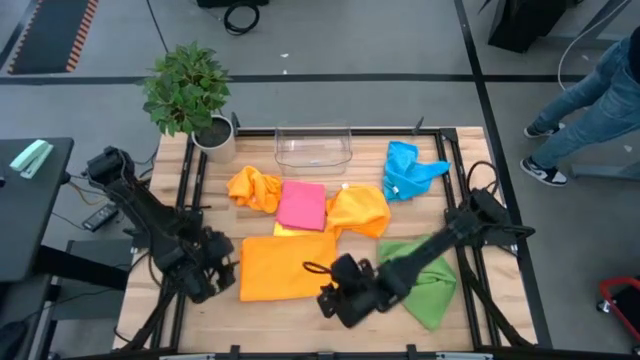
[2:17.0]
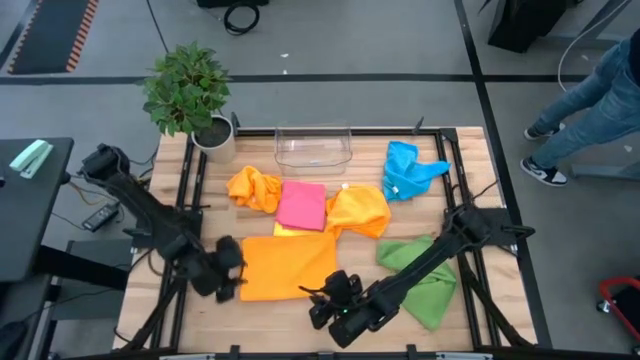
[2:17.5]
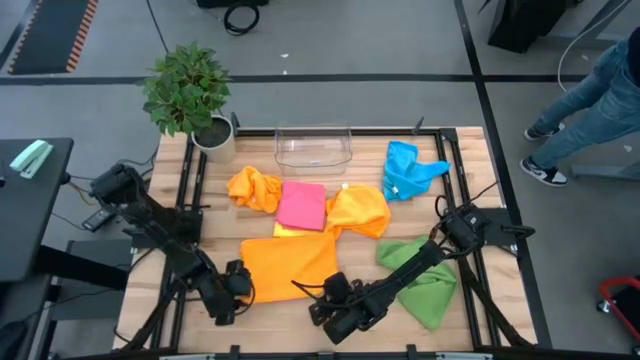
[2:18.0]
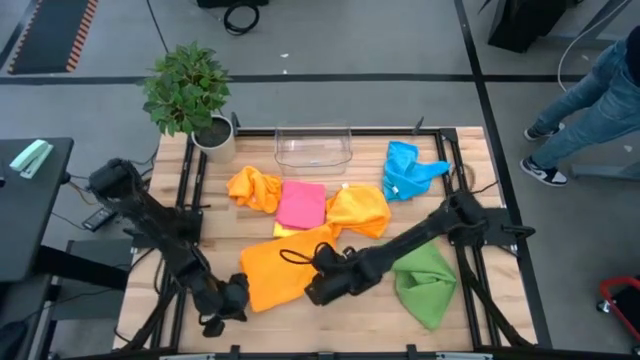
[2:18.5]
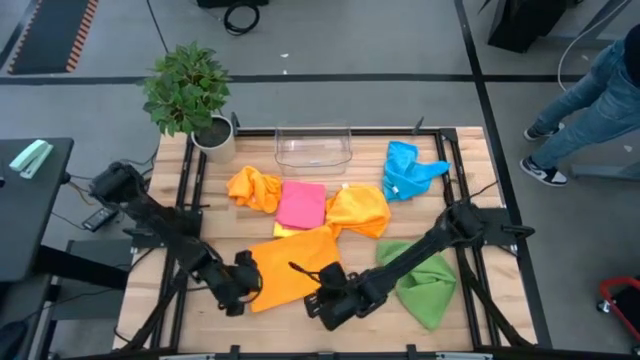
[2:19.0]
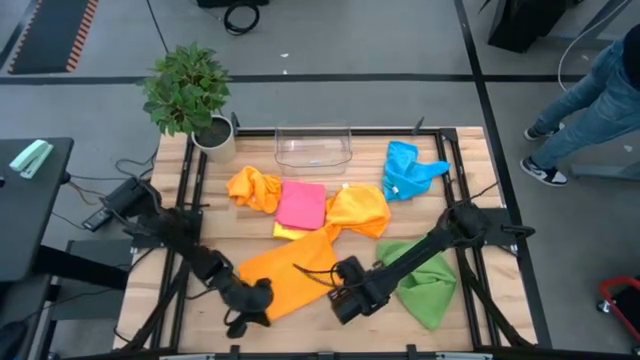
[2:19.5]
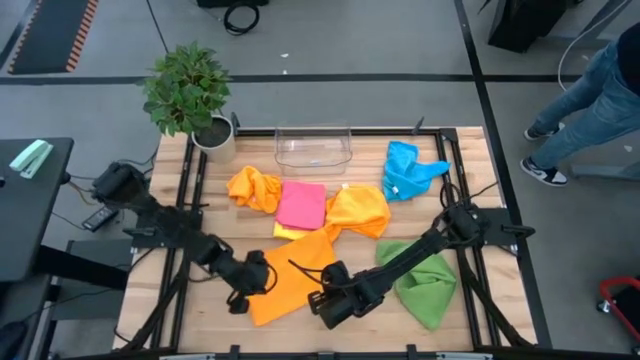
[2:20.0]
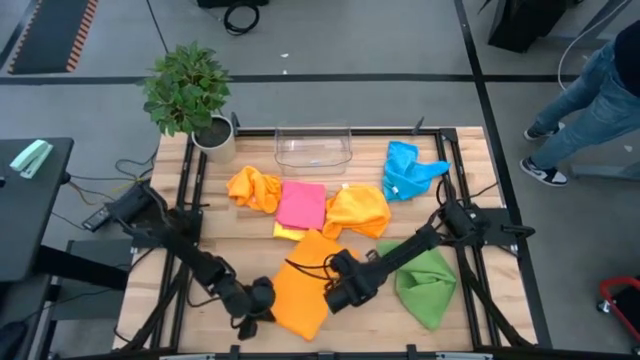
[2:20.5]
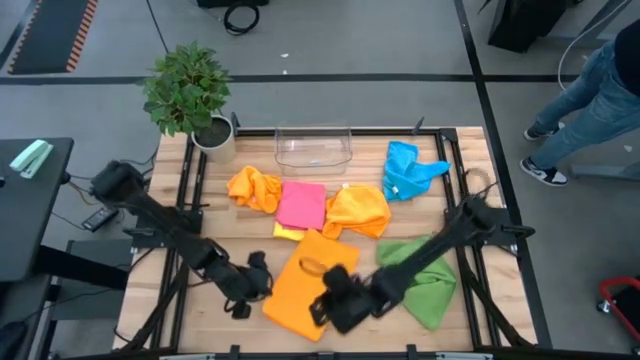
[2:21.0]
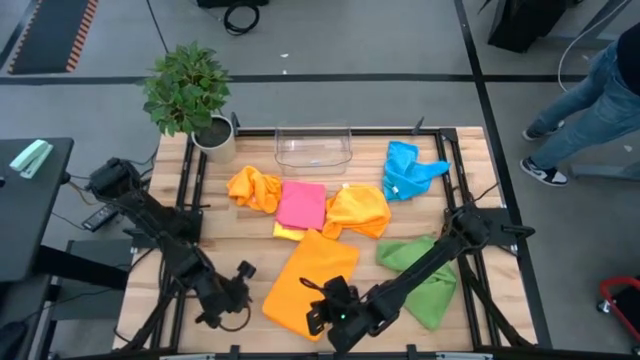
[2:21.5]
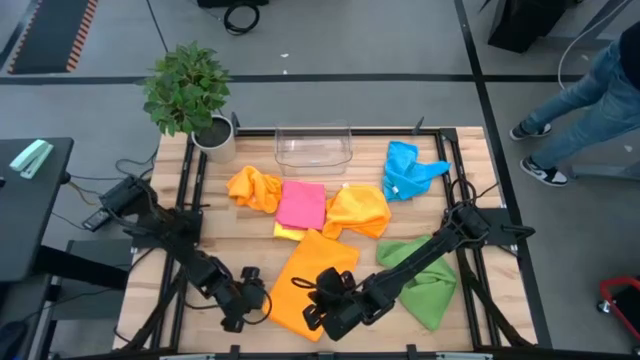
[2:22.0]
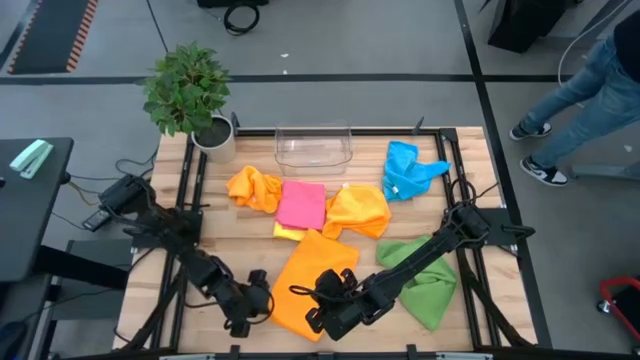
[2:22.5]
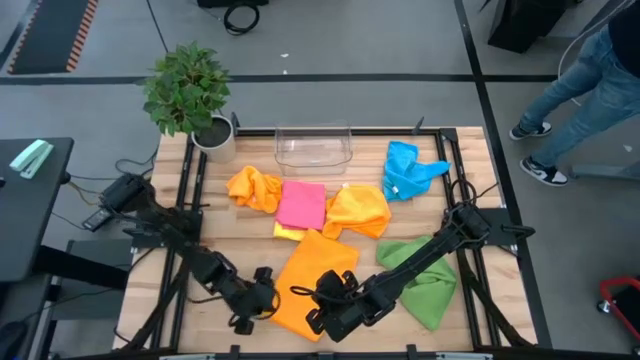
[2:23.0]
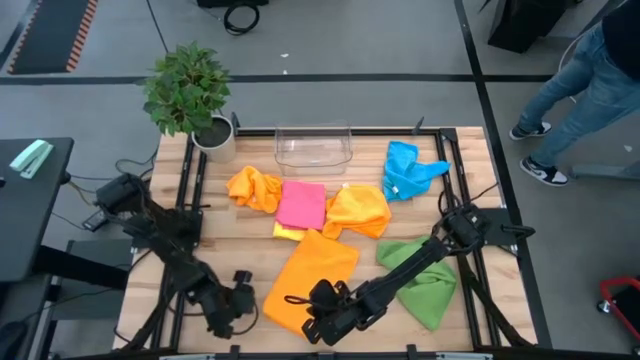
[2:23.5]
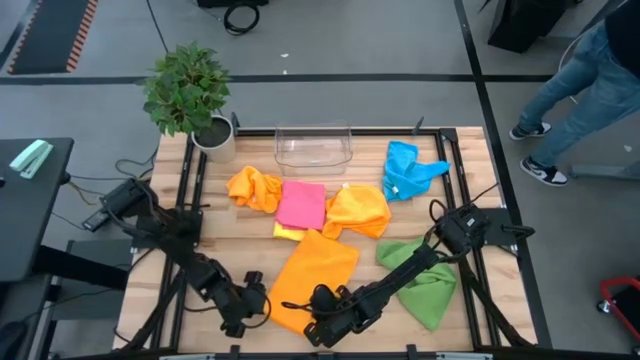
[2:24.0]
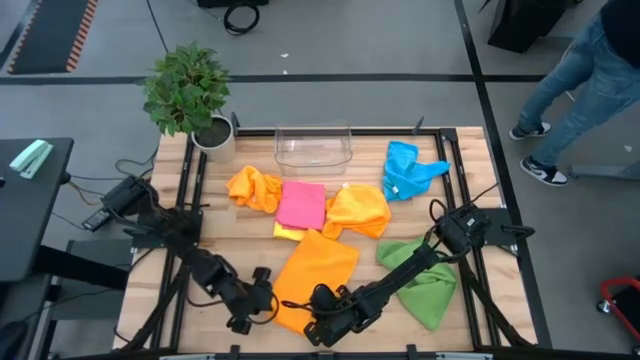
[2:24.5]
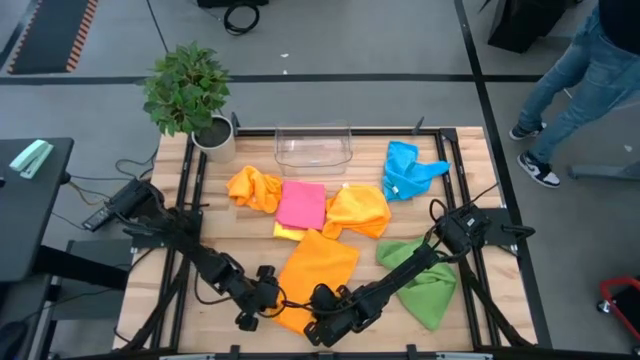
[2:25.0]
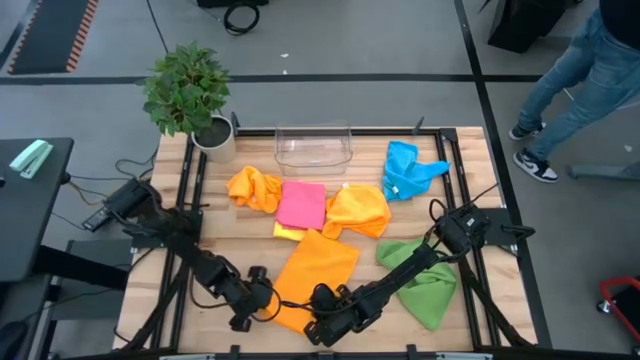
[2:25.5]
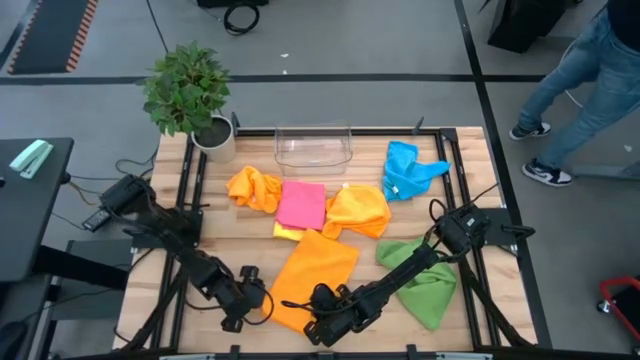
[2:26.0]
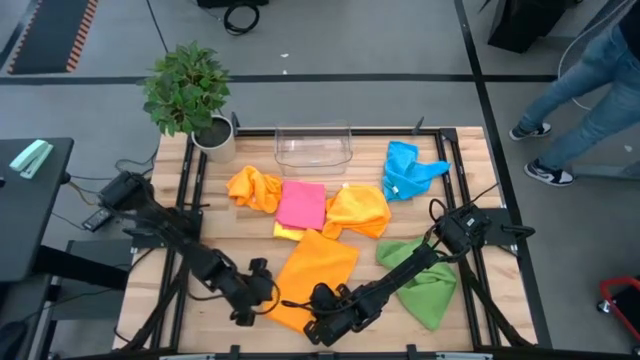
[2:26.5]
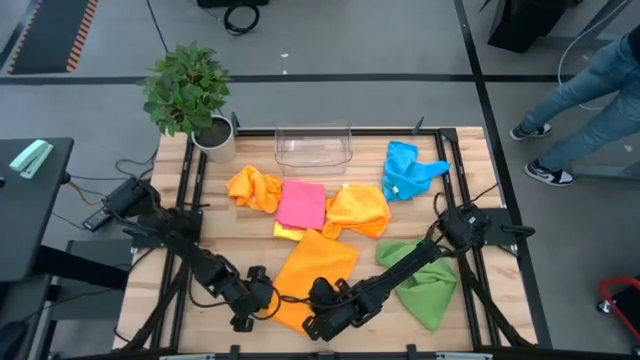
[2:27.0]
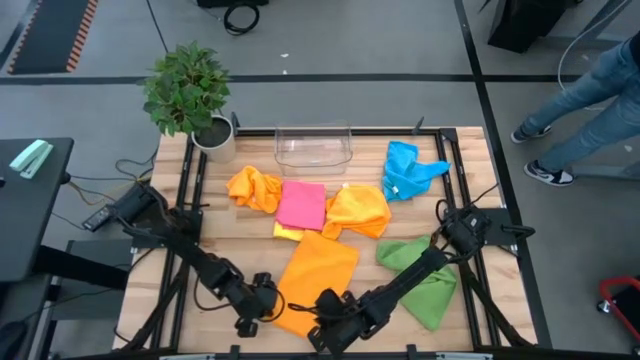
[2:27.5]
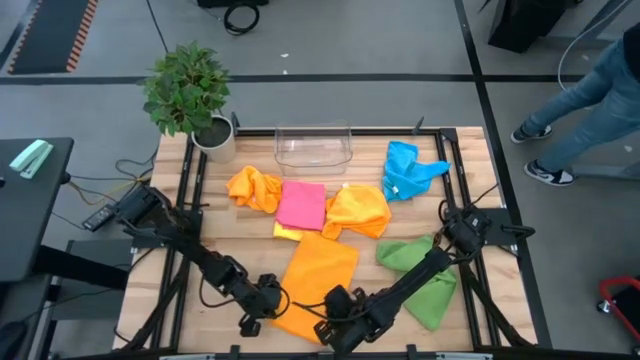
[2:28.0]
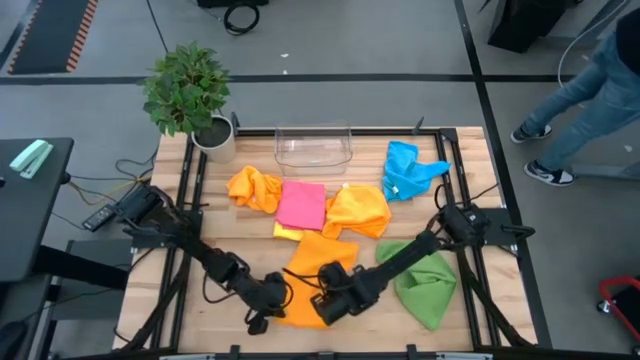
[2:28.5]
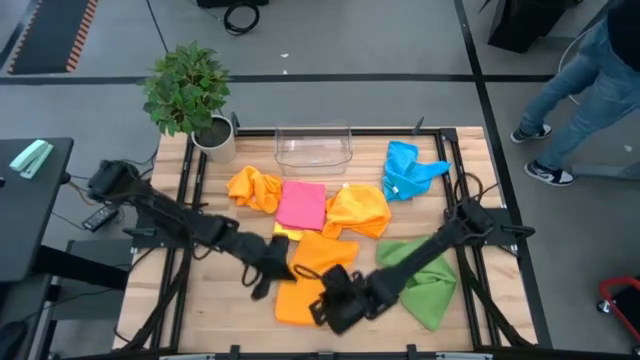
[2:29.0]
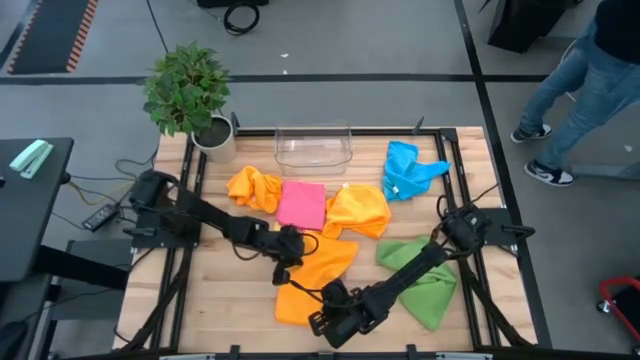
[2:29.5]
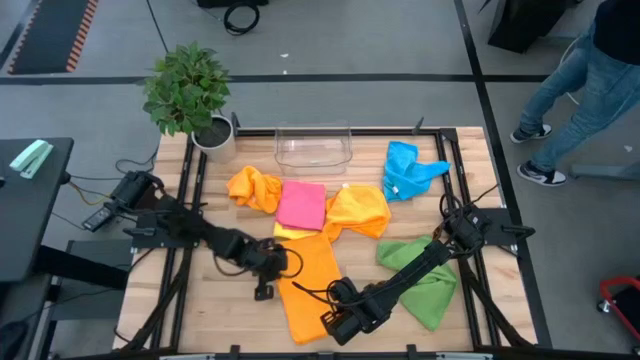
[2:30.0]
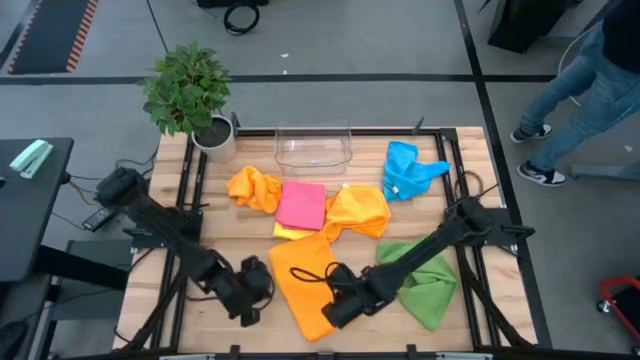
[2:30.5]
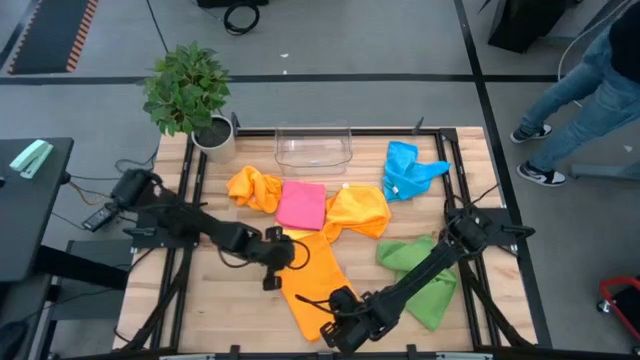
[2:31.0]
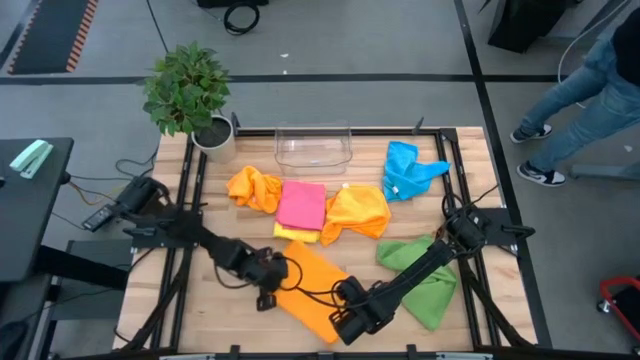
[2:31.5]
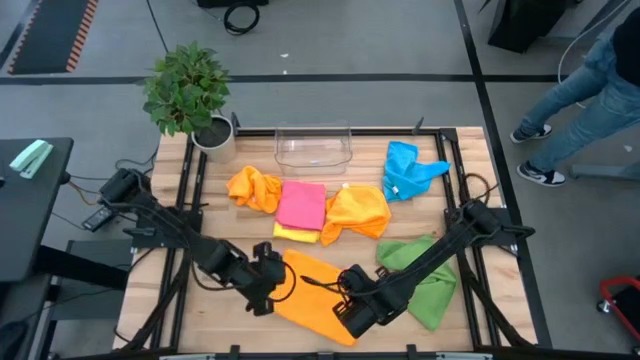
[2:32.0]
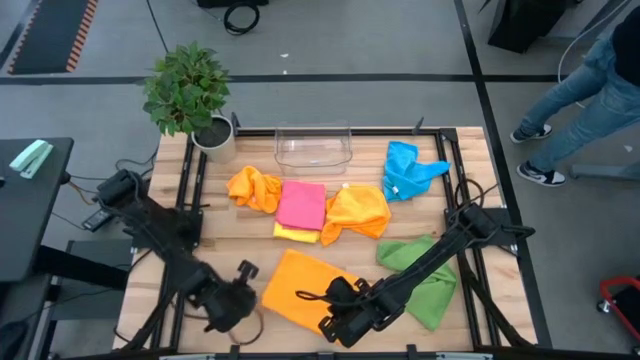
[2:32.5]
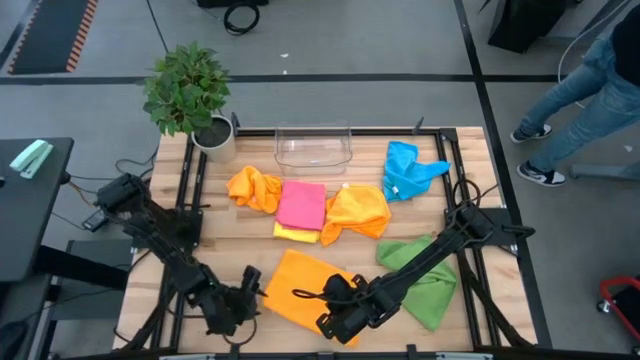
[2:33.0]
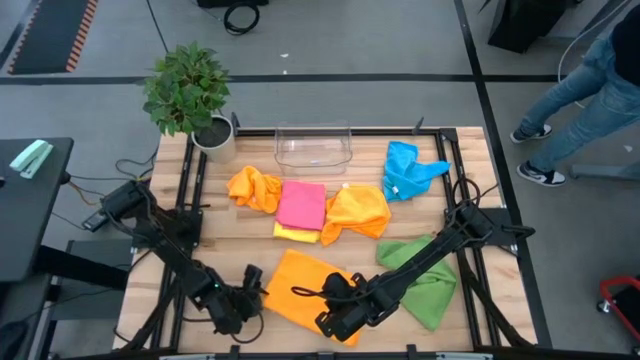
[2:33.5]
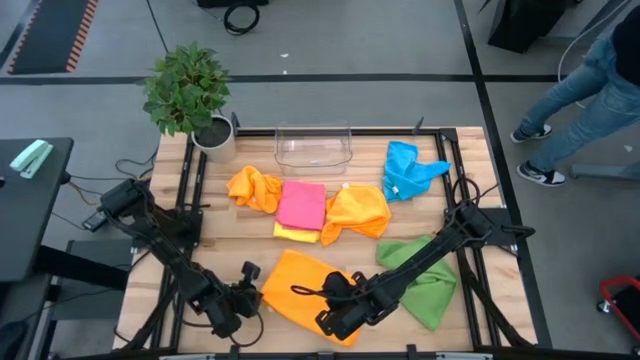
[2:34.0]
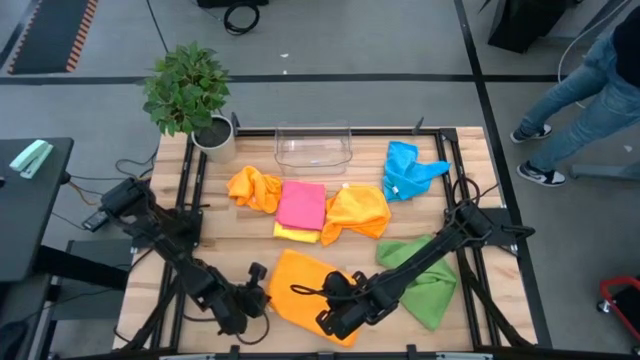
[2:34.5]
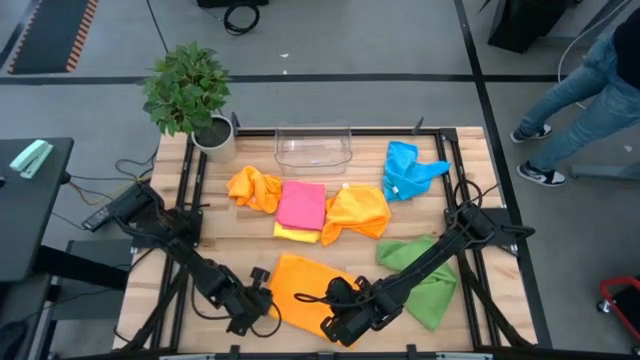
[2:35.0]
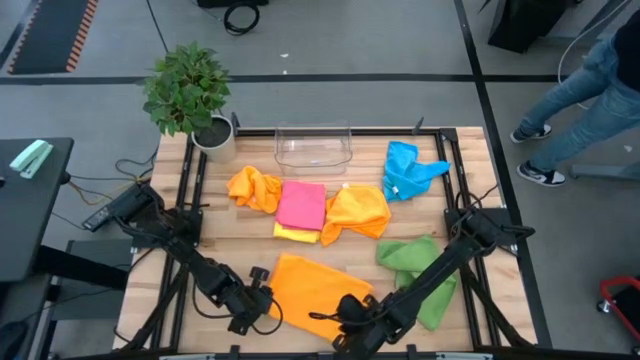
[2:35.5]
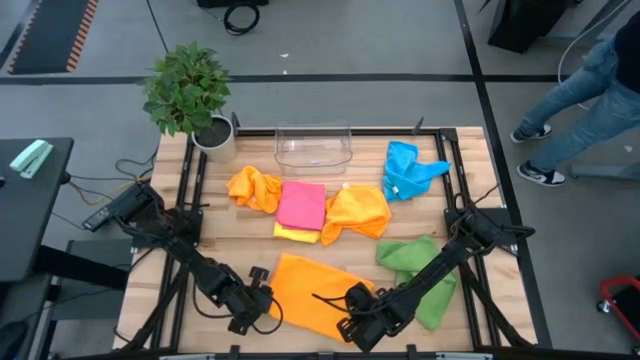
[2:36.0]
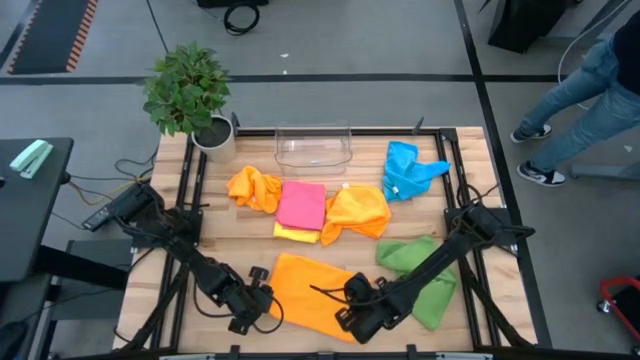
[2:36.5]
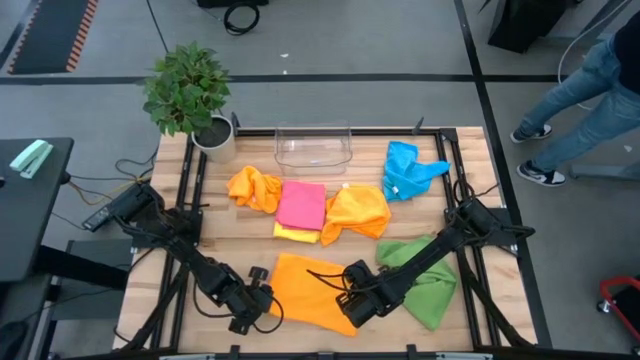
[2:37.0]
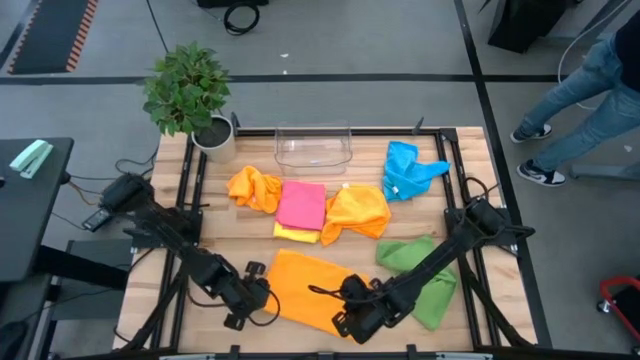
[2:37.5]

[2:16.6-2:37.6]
Task: Fold microfiber towels
Fold the bottom orange microfiber cloth
